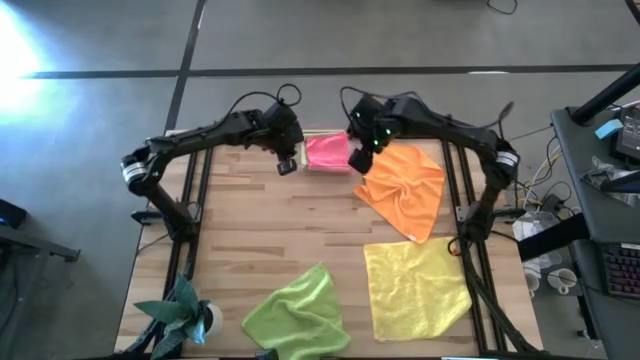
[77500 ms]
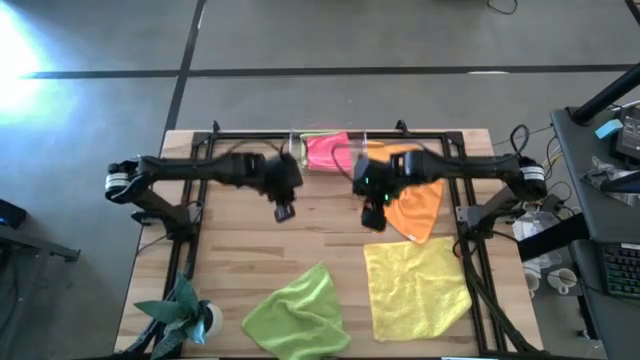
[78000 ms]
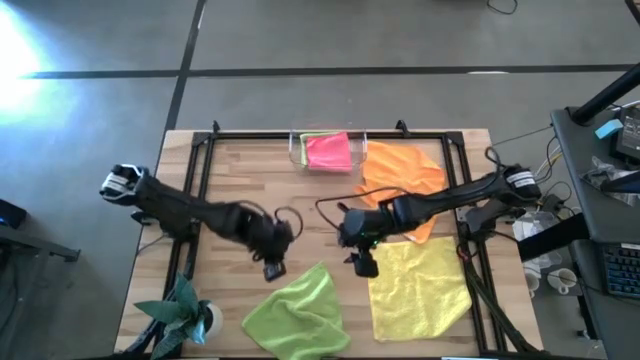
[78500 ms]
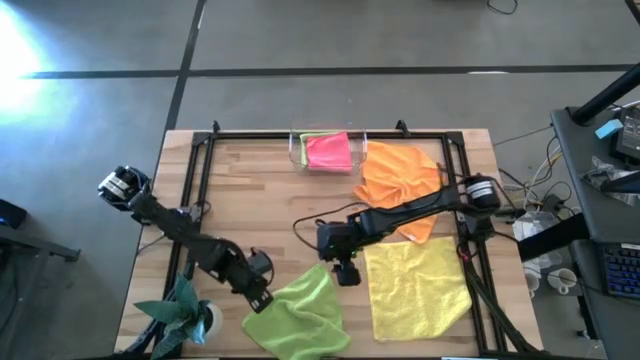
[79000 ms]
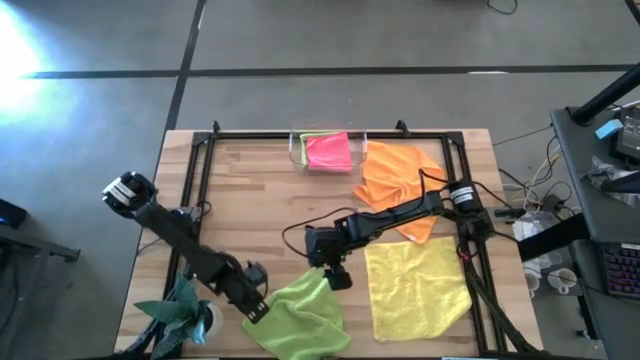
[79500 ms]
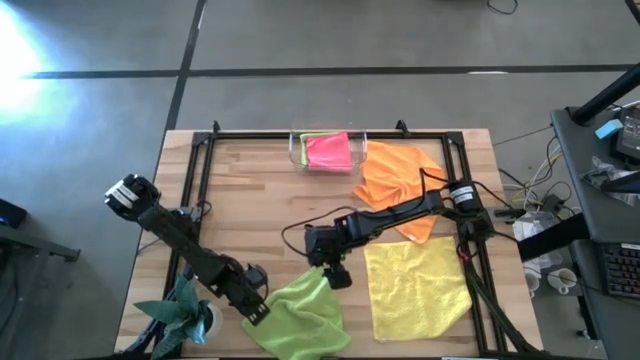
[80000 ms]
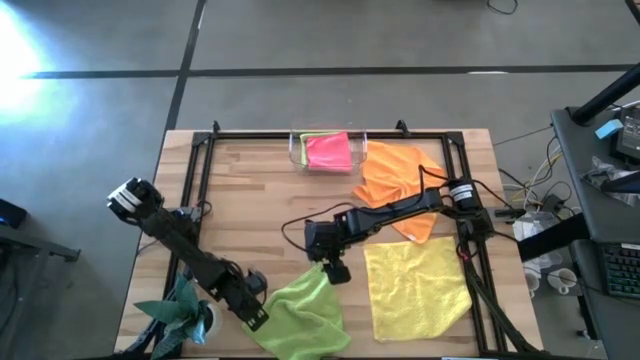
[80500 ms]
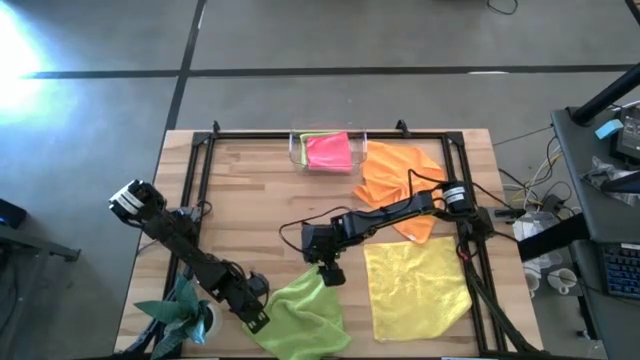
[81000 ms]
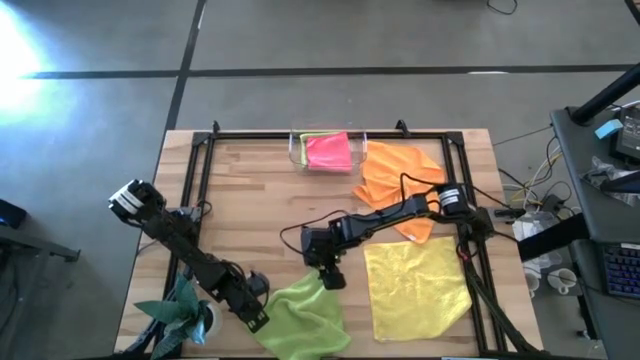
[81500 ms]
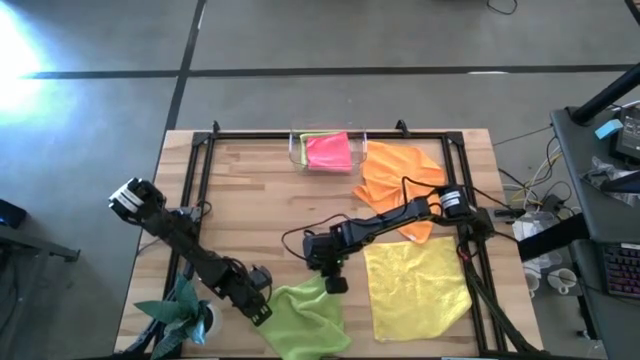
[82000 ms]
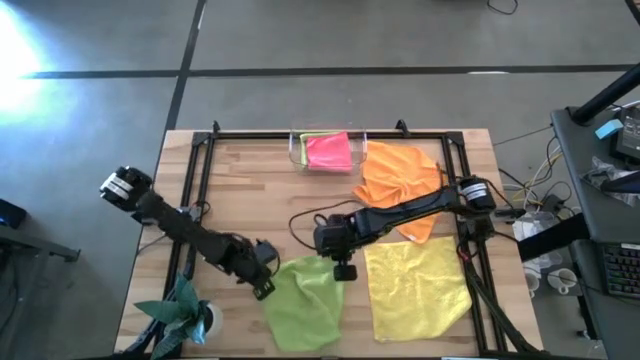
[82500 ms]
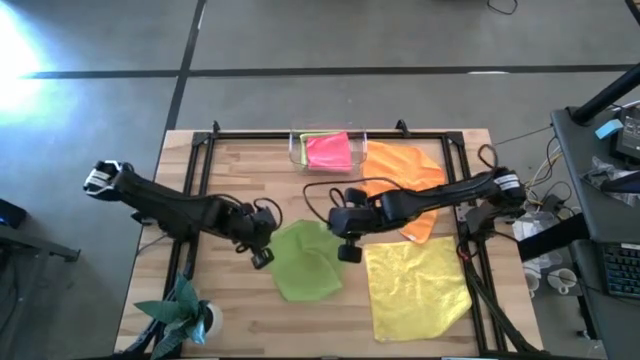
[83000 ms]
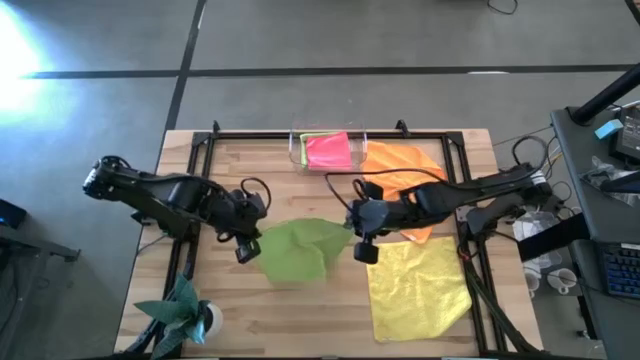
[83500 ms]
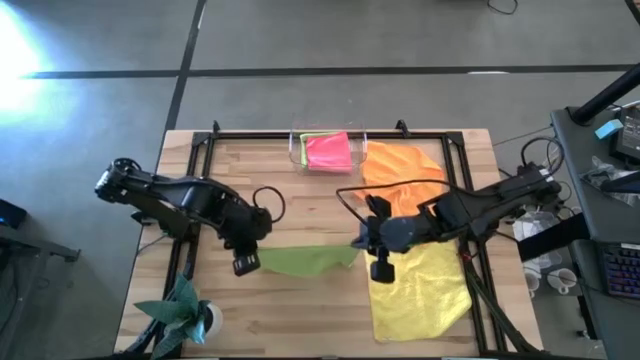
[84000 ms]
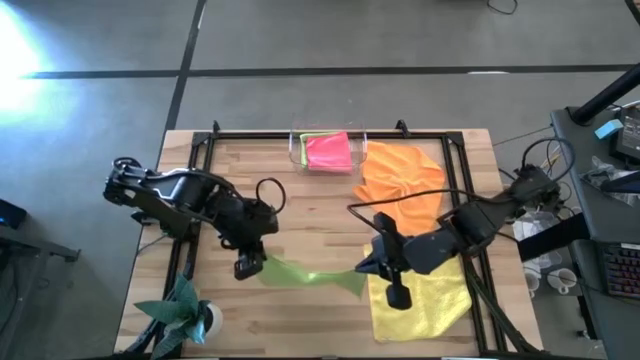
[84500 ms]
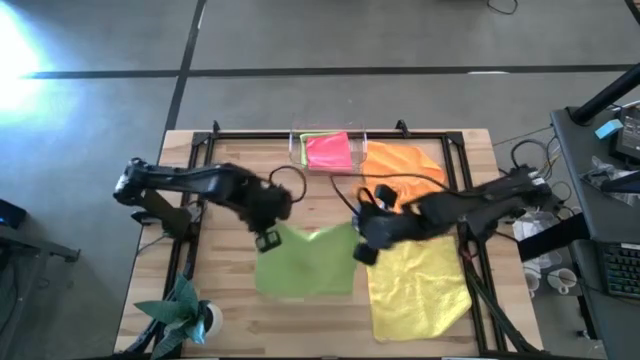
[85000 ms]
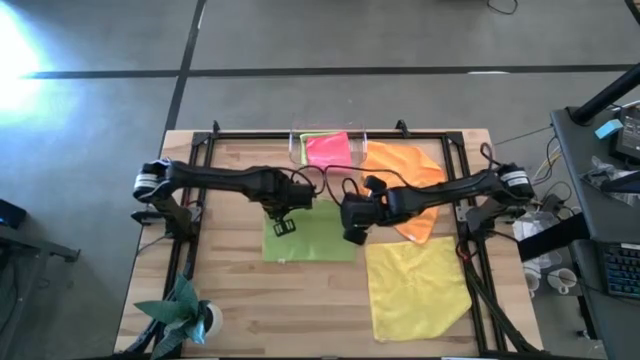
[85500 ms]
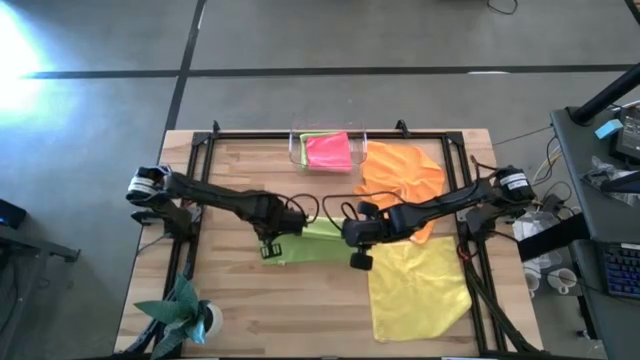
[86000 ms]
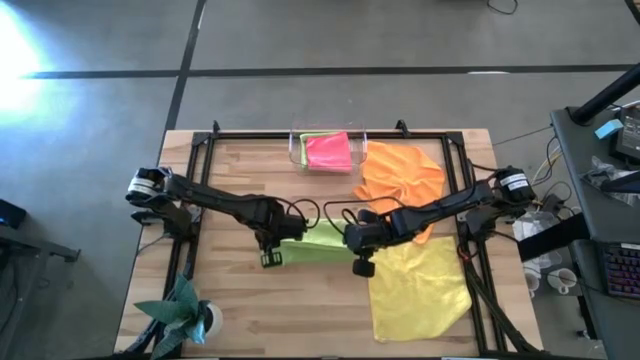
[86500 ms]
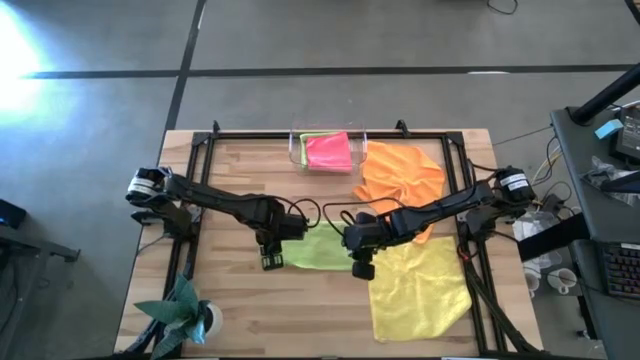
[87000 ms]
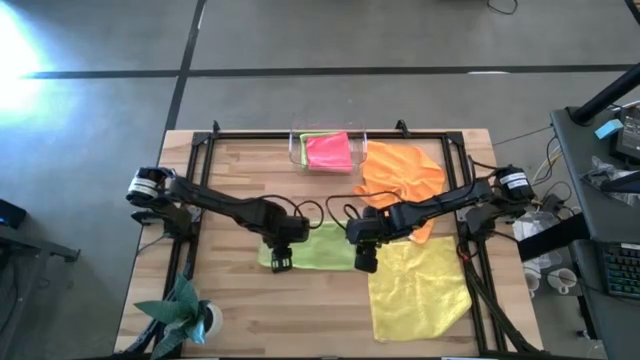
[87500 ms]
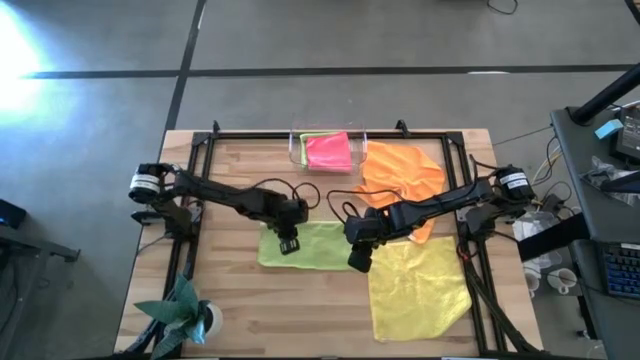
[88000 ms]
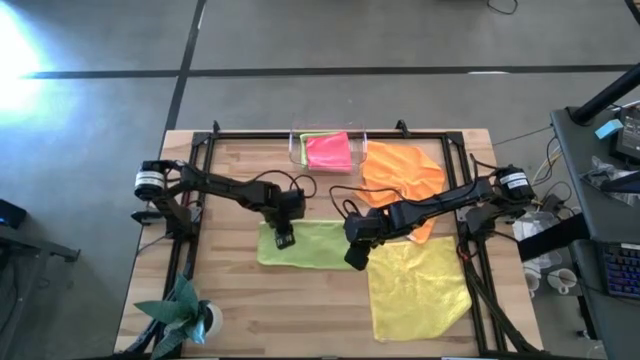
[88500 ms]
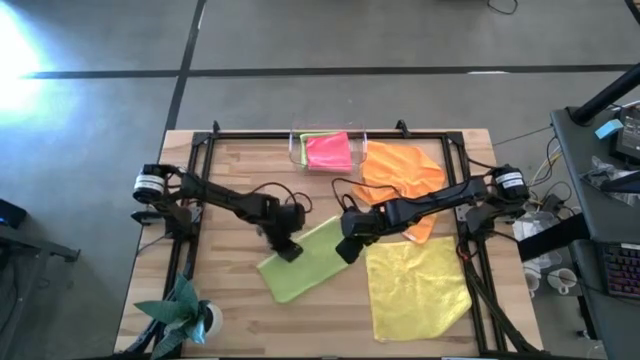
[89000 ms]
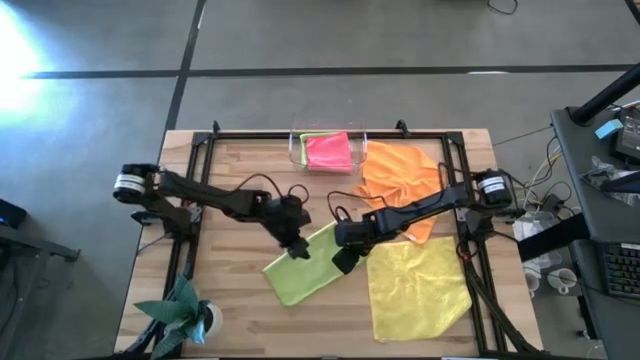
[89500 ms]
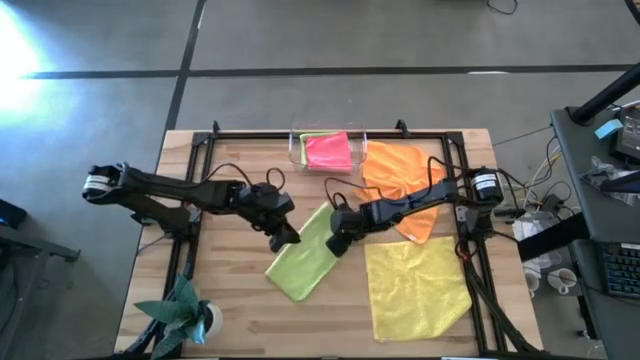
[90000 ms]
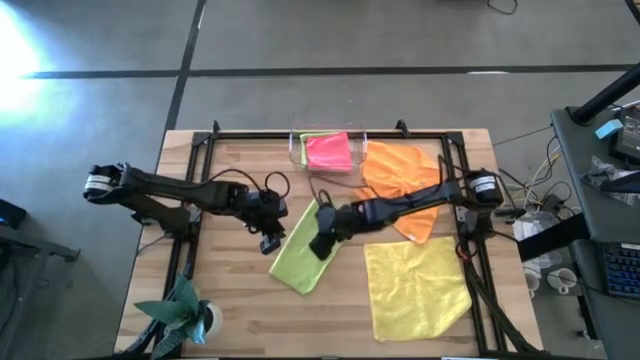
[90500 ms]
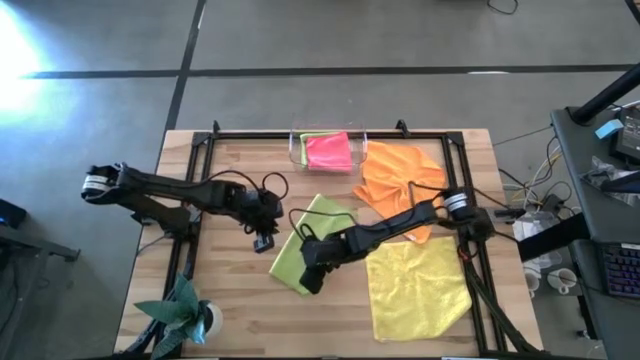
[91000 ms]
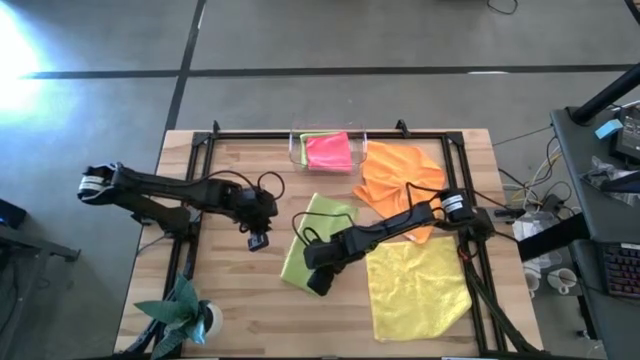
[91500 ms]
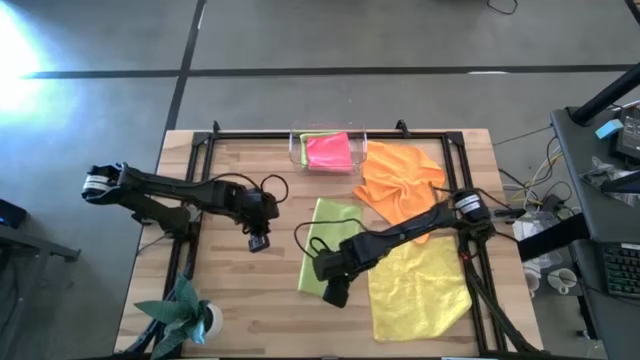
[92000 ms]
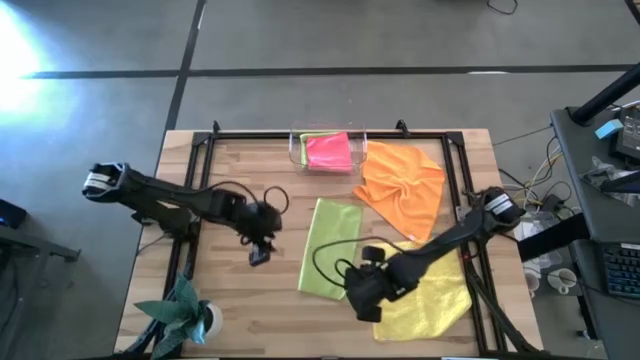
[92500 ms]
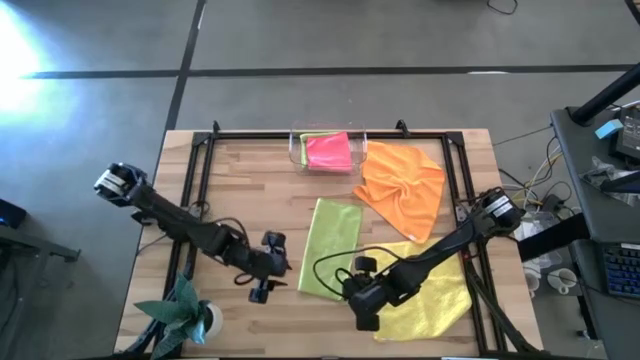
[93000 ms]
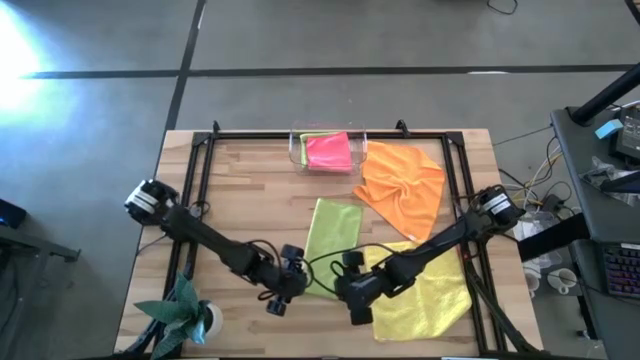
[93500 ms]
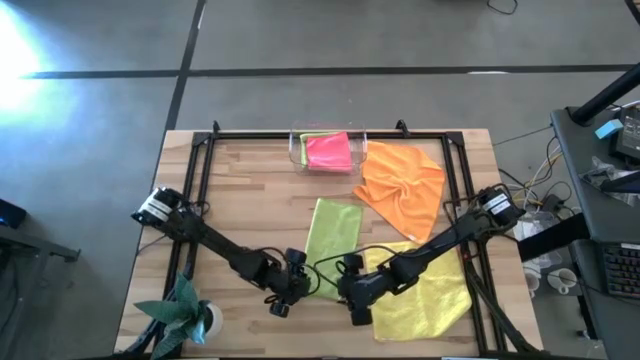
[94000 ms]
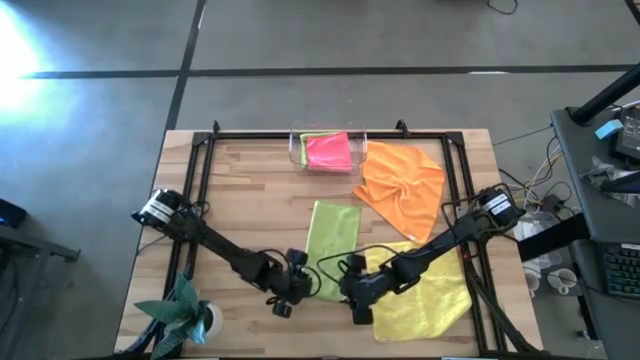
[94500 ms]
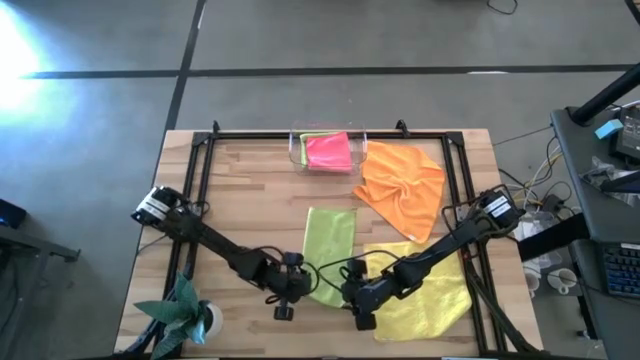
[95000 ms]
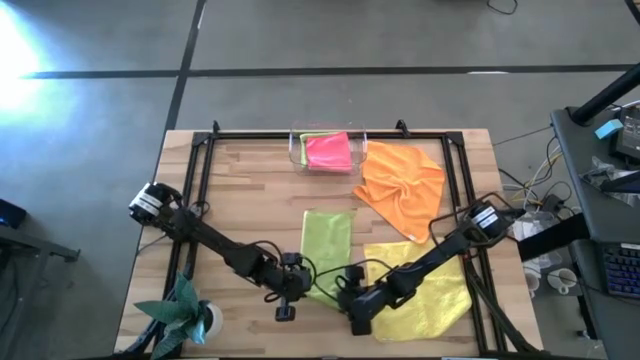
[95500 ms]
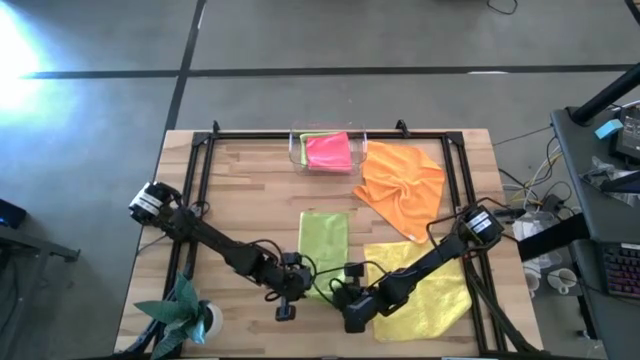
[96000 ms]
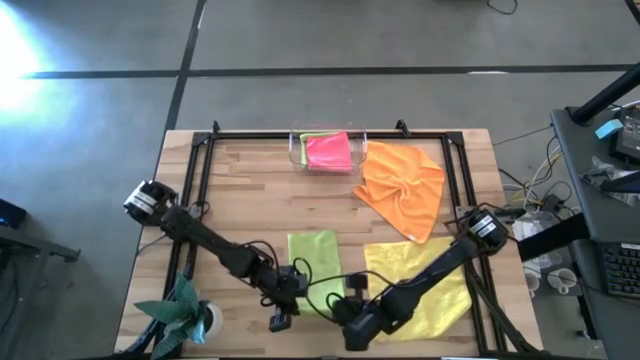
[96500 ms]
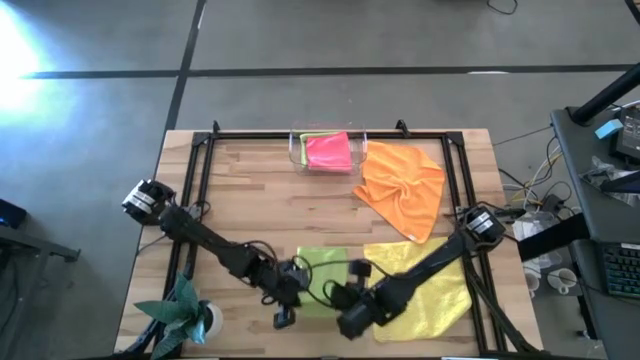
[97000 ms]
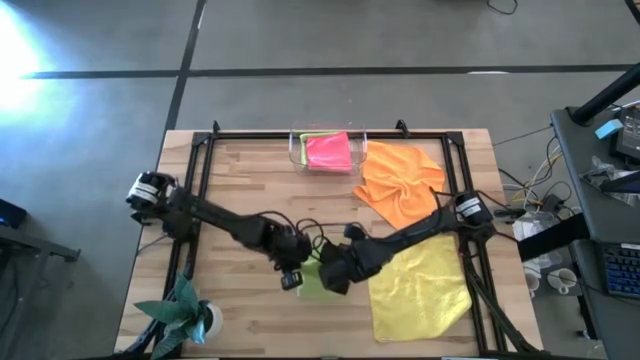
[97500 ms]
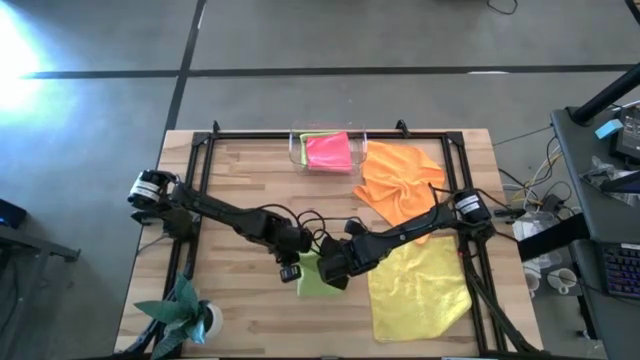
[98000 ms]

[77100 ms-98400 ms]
Task: Fold microfiber towels
Fold the green microfiber towel
